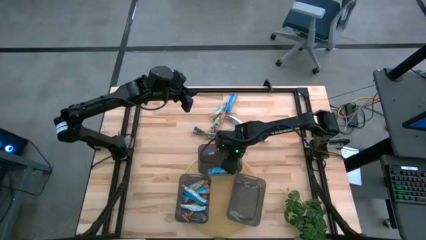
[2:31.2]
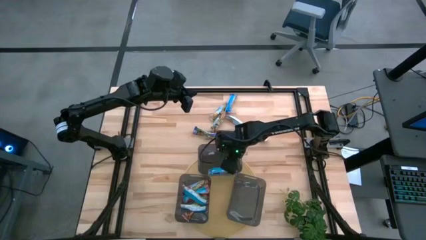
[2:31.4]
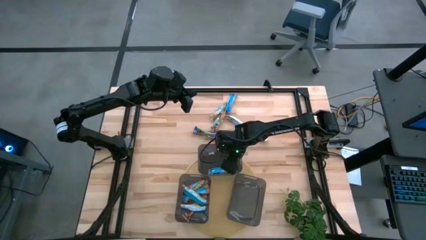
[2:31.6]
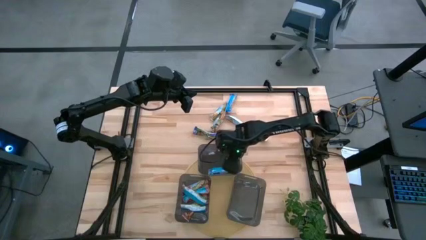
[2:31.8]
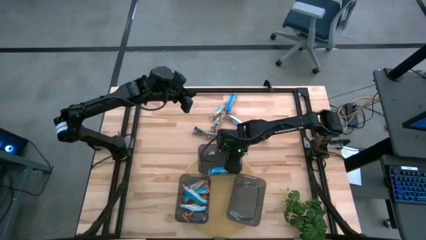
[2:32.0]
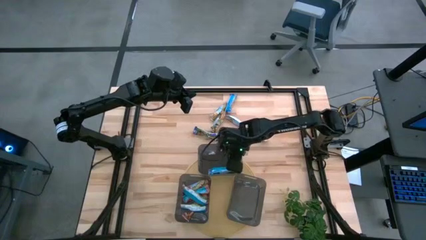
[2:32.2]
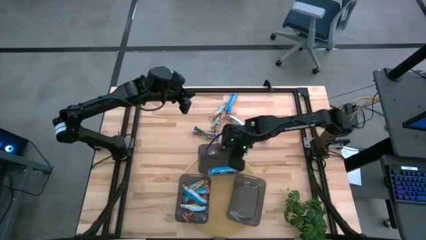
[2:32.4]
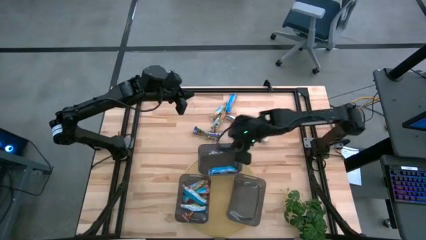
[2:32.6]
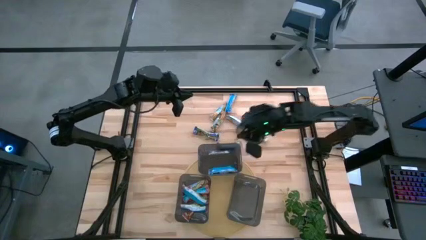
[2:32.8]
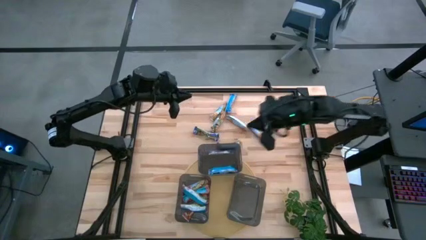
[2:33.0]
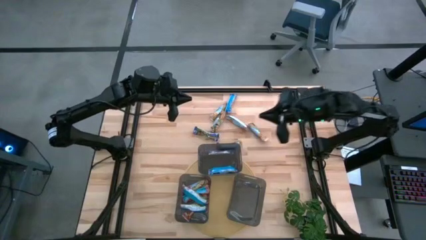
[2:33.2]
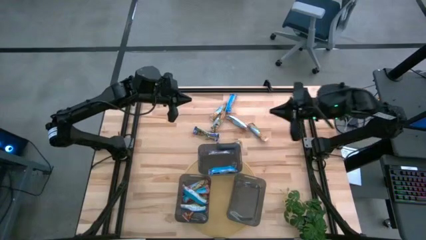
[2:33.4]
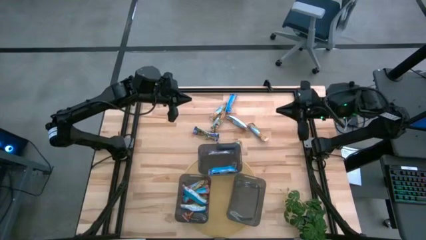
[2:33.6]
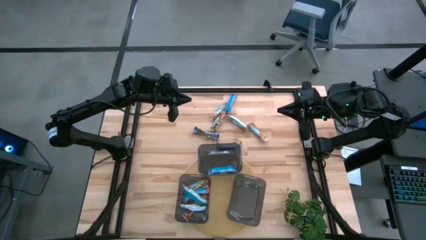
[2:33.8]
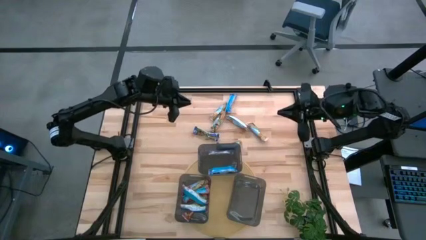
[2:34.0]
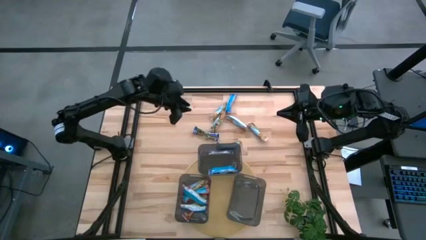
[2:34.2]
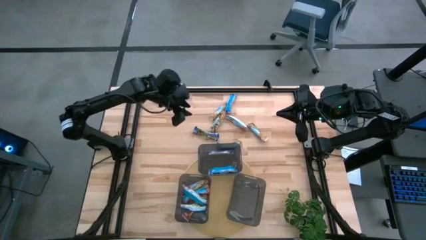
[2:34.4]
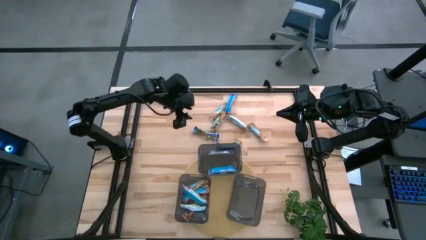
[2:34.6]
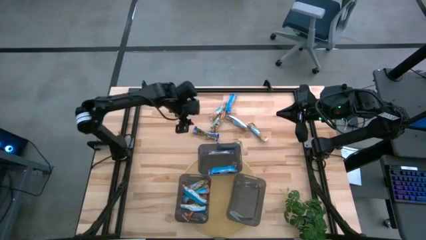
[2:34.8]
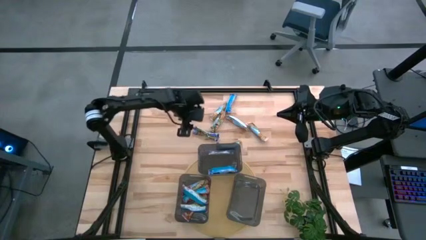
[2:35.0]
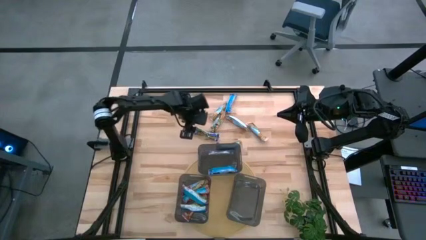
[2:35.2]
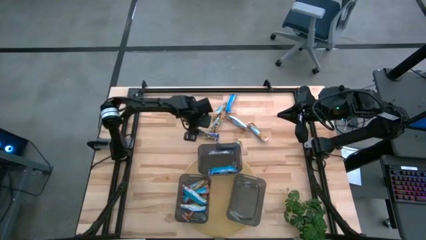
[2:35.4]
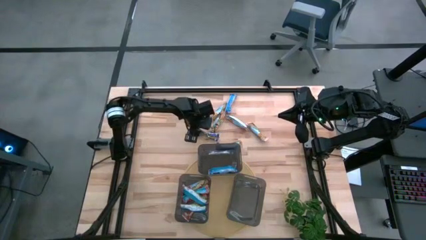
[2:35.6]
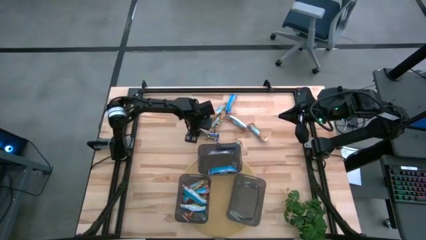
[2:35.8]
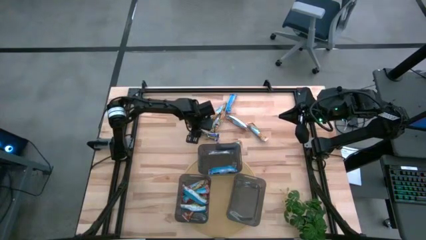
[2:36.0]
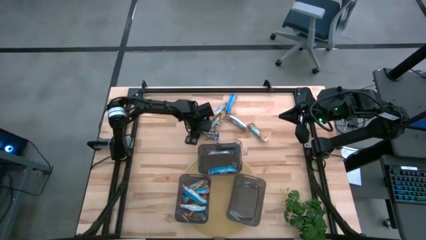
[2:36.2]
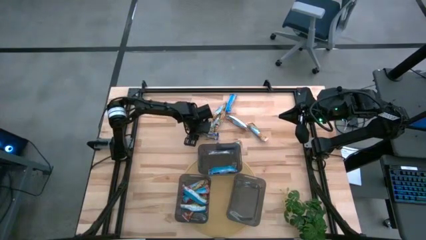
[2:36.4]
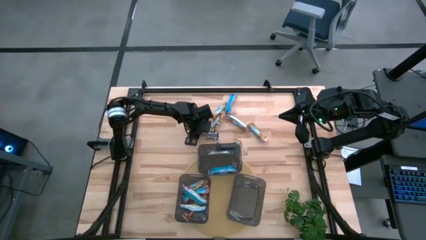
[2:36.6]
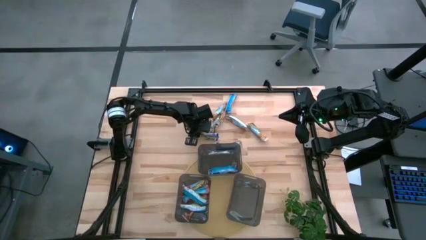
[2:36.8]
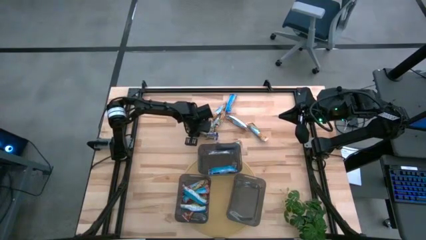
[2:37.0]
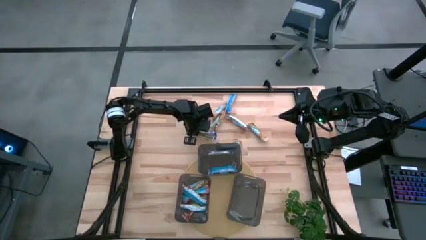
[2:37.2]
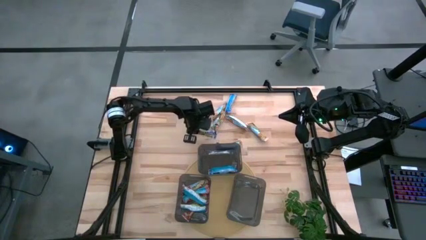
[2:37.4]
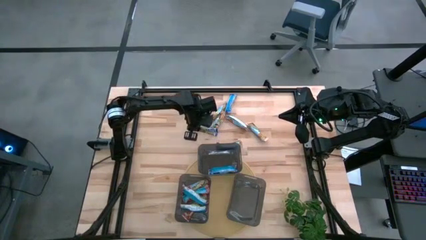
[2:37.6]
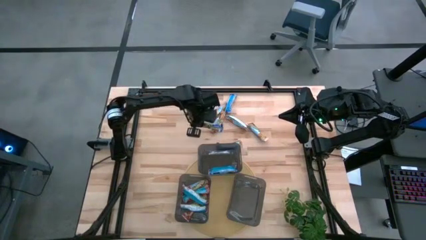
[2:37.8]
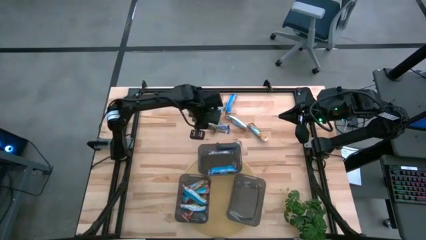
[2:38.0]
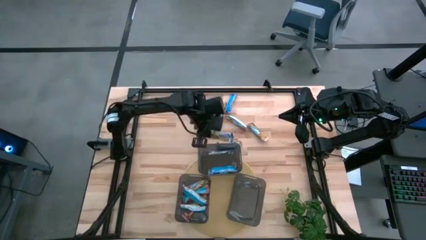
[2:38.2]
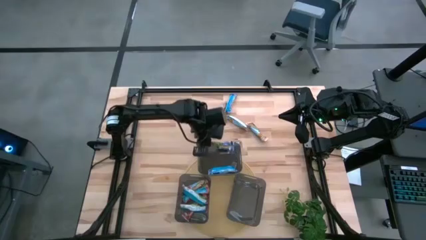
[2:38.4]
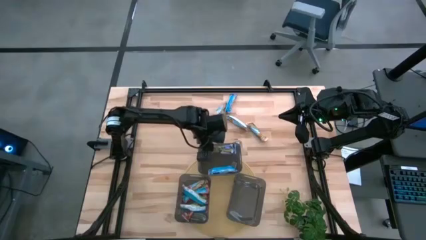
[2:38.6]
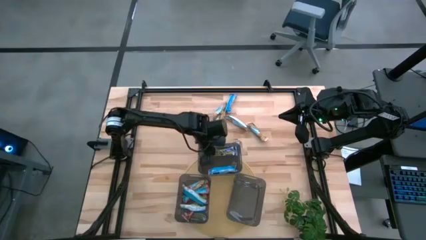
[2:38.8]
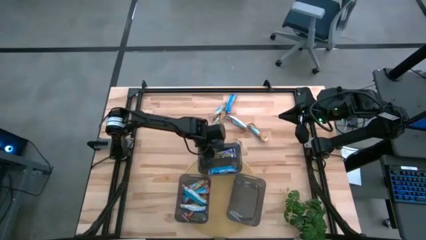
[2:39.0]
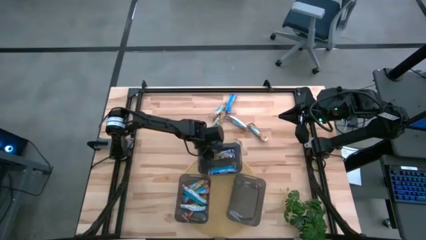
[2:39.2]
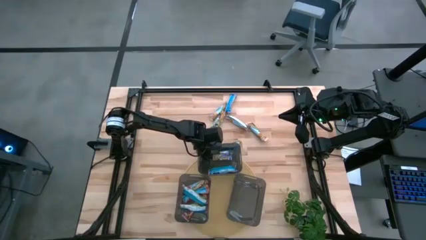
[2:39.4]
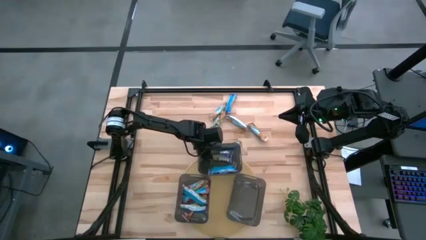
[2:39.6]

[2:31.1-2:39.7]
Task: Pick and place Granola Bars by type
Put the bottom blue granola bar into the top black bin

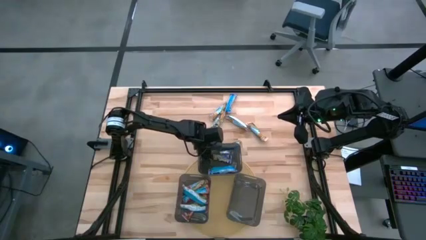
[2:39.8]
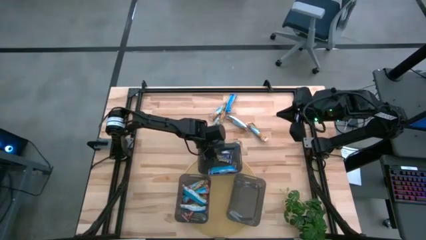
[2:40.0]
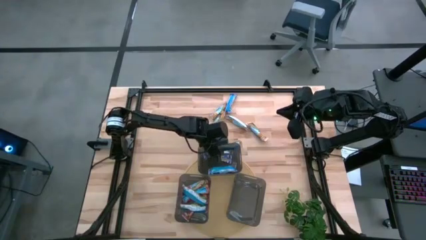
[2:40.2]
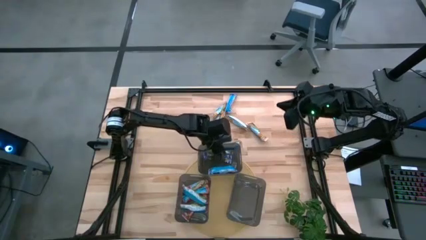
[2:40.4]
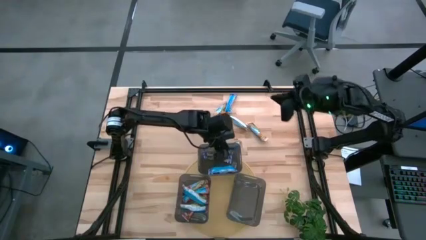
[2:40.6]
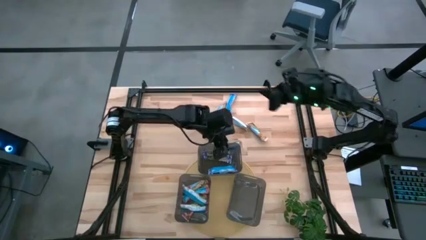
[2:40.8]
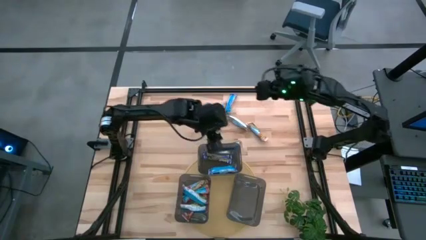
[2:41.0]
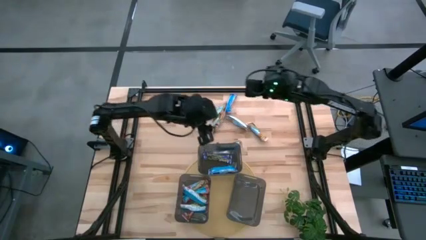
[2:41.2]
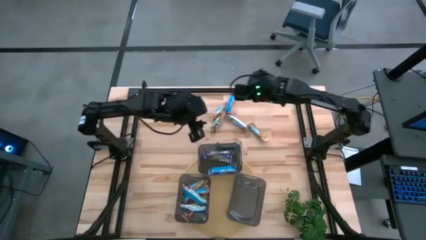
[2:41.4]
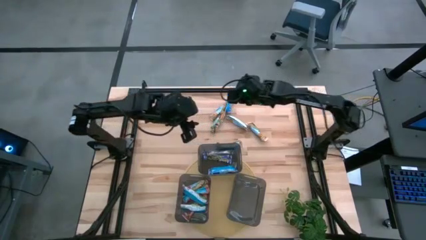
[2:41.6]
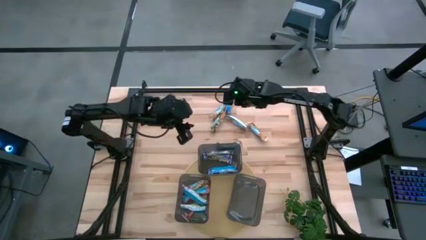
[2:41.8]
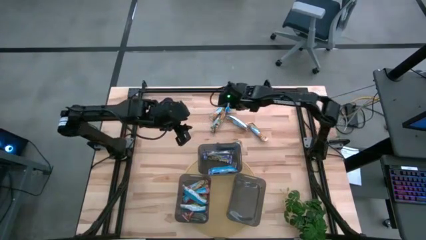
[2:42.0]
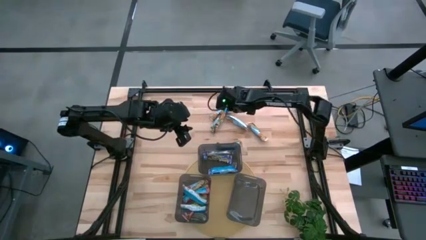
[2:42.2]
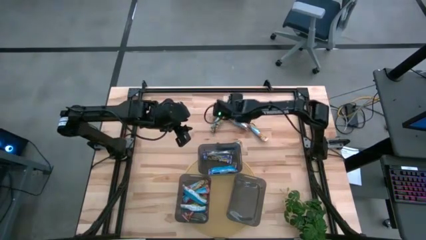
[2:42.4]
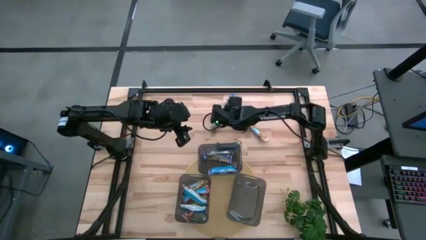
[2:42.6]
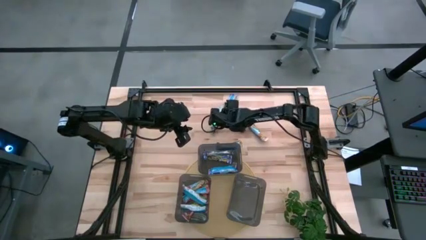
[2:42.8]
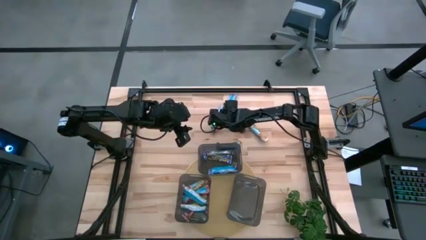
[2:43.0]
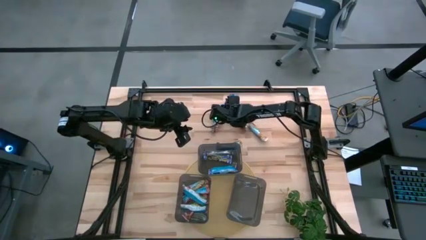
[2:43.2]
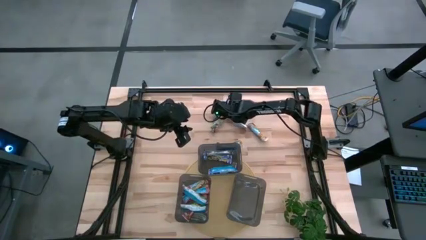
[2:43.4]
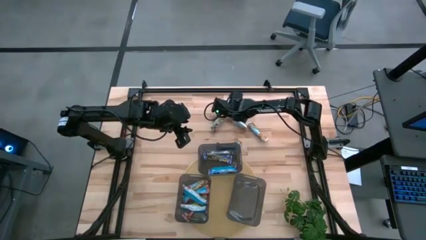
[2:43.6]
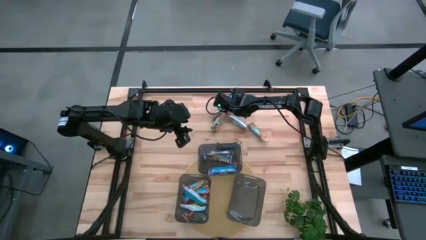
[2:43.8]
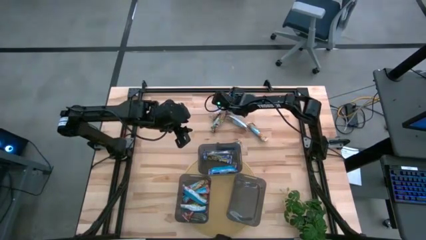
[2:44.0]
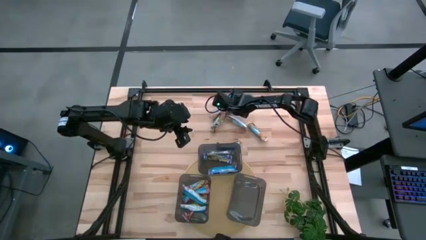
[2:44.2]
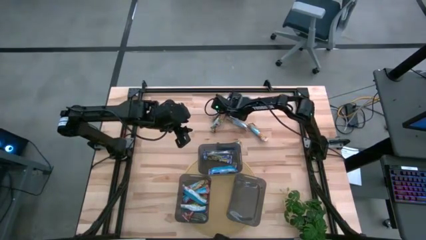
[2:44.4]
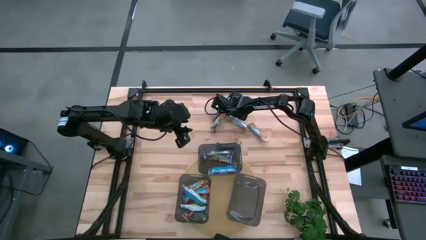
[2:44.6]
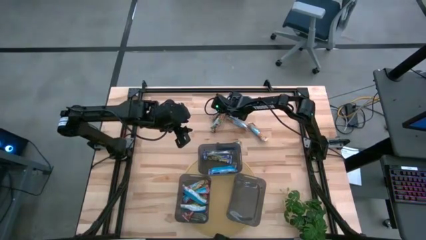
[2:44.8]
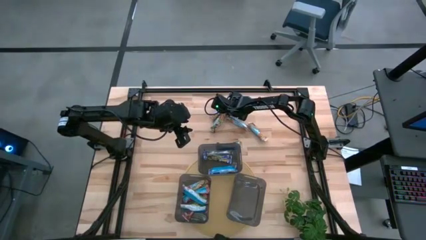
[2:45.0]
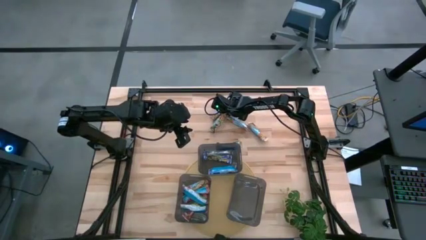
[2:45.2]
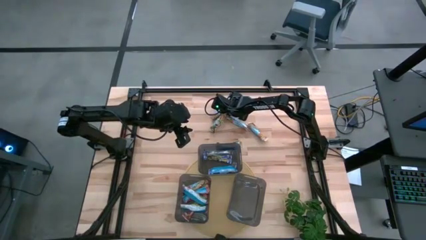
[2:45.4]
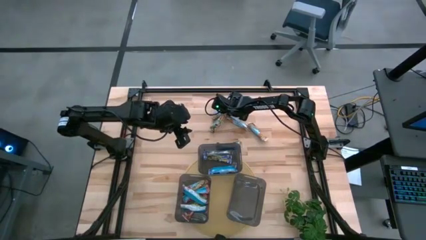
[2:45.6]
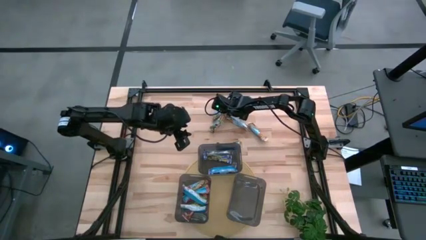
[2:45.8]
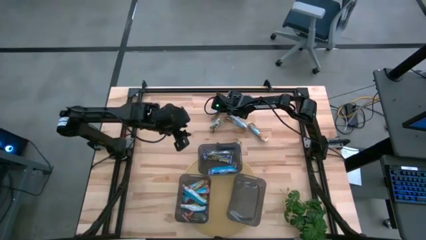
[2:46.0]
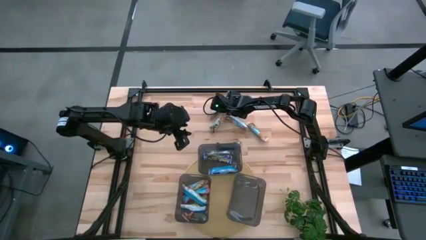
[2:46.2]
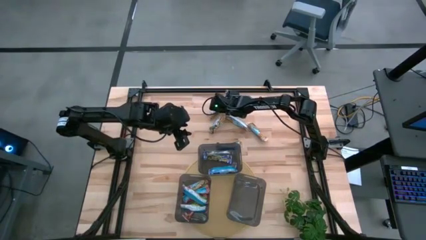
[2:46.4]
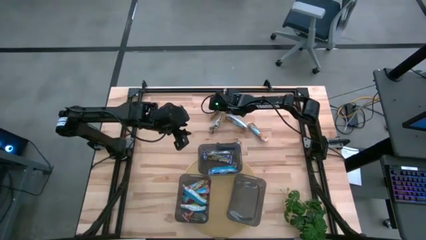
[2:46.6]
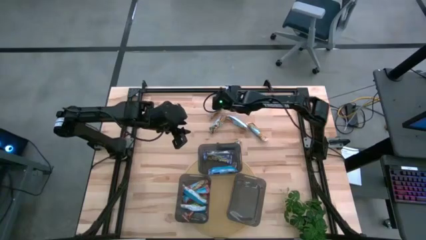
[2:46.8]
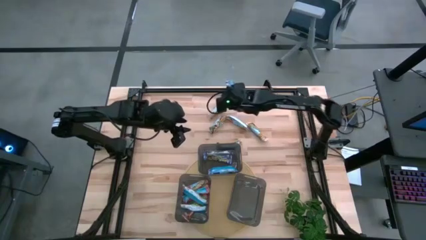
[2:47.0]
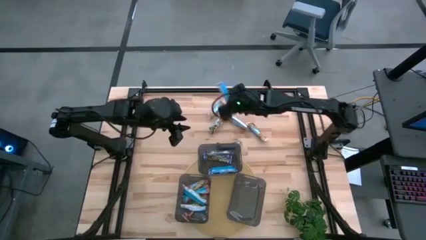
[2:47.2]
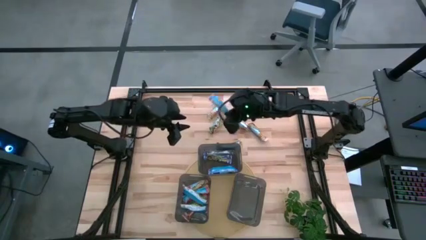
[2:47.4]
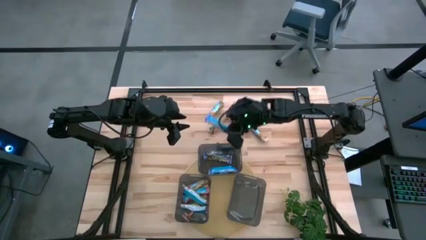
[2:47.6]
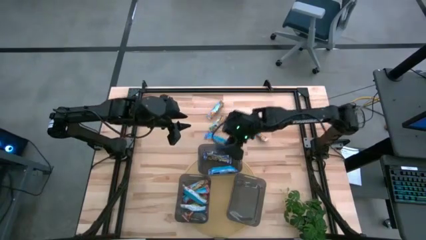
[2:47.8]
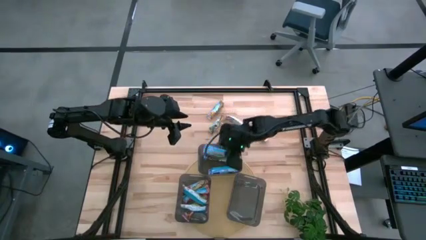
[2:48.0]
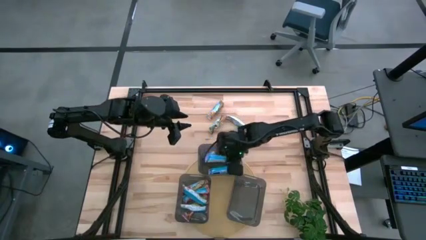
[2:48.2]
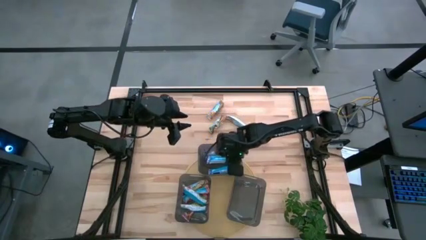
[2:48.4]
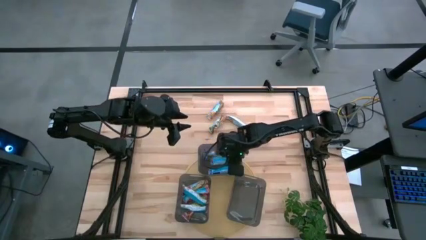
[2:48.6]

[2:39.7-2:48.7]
Put the blue granola bar into the top black bin
